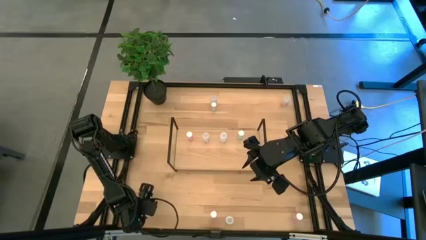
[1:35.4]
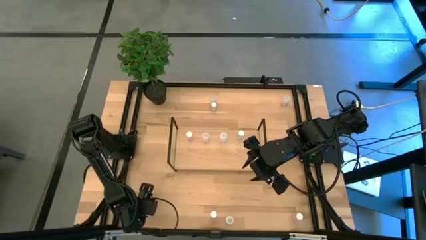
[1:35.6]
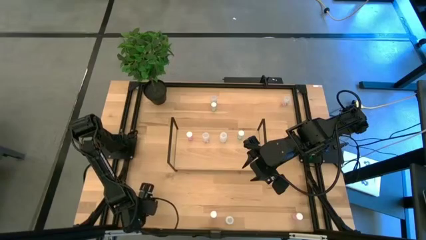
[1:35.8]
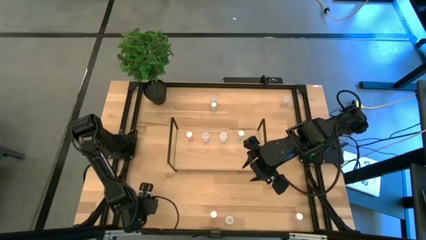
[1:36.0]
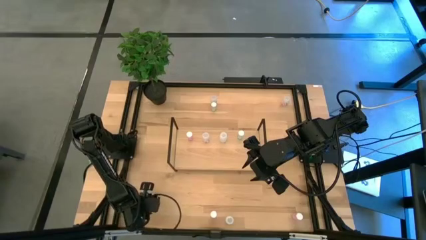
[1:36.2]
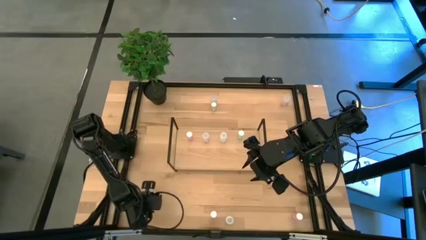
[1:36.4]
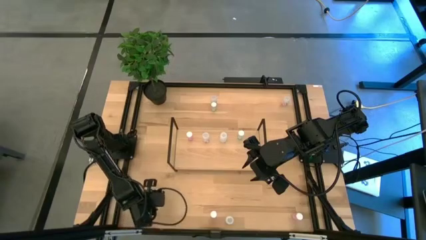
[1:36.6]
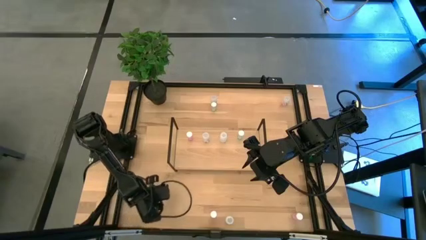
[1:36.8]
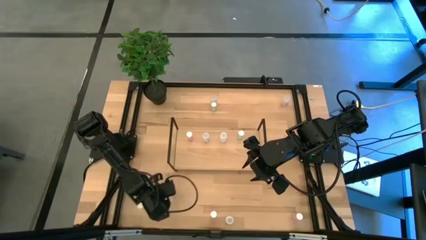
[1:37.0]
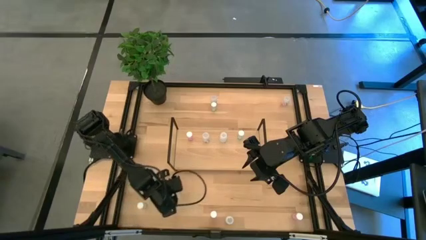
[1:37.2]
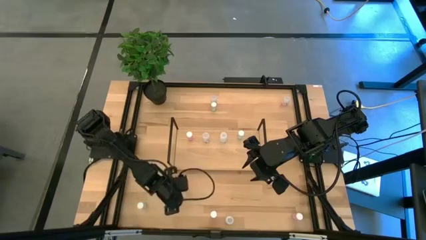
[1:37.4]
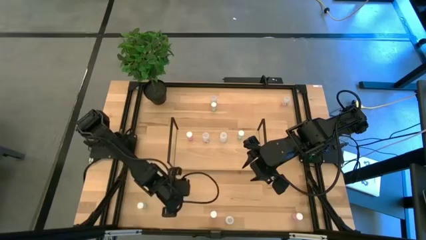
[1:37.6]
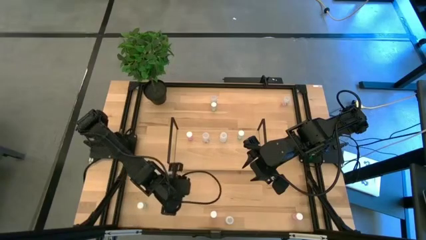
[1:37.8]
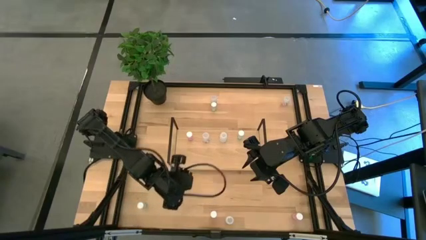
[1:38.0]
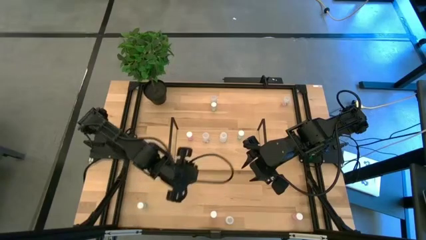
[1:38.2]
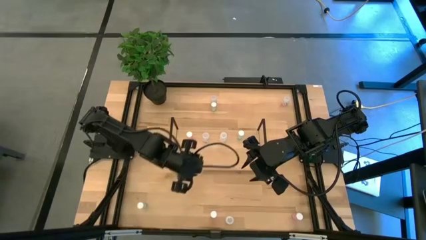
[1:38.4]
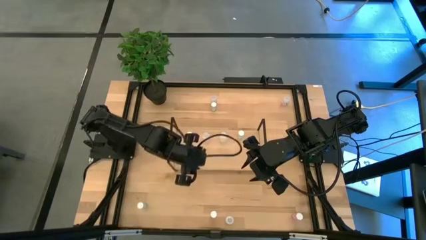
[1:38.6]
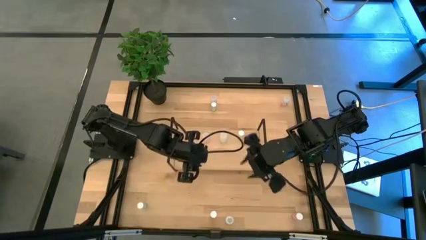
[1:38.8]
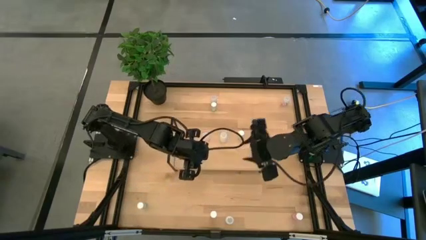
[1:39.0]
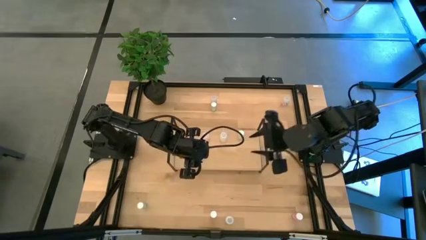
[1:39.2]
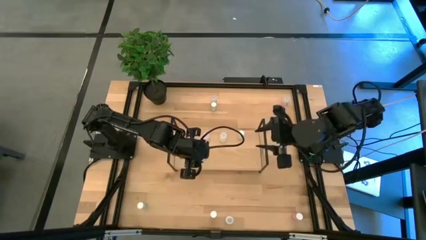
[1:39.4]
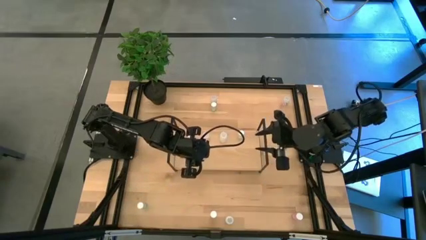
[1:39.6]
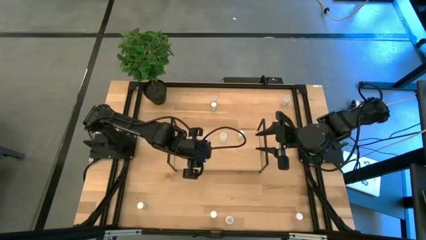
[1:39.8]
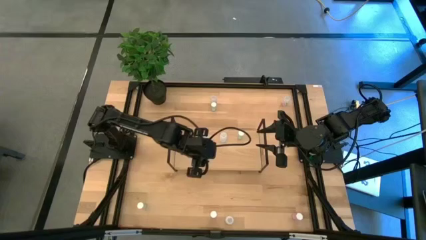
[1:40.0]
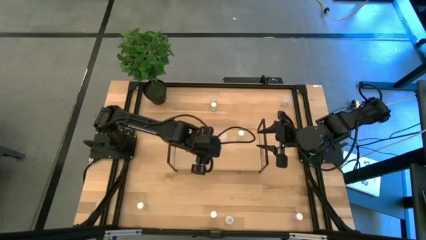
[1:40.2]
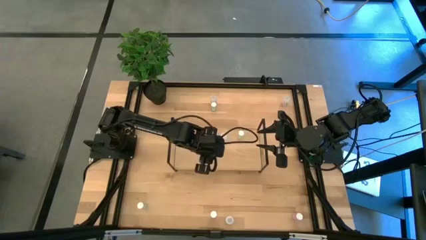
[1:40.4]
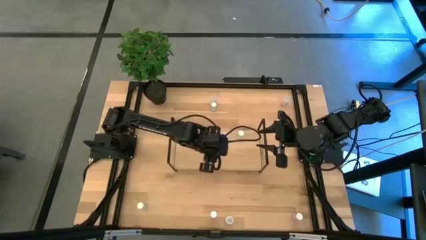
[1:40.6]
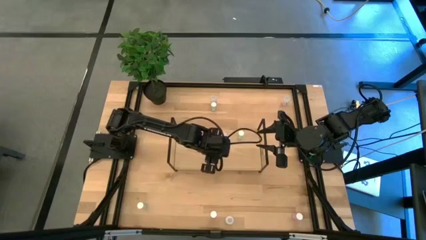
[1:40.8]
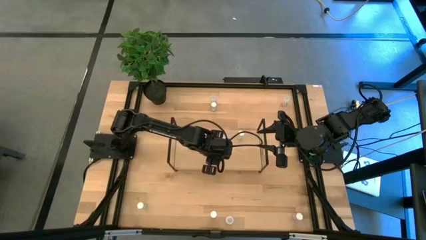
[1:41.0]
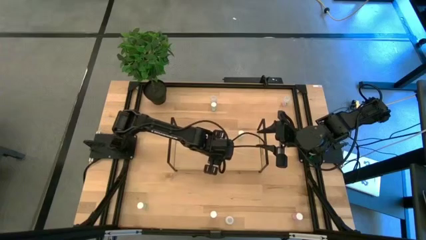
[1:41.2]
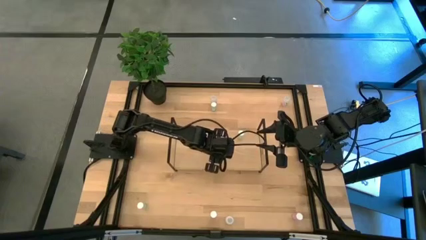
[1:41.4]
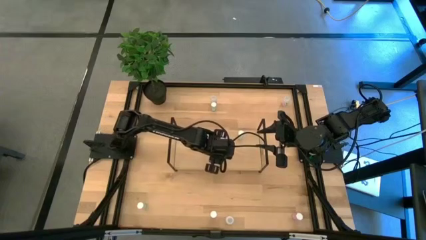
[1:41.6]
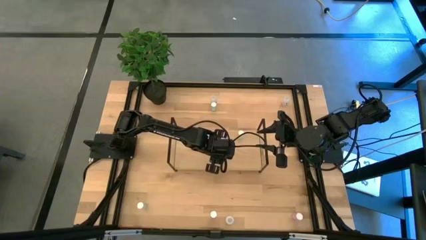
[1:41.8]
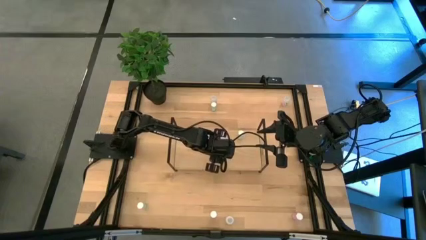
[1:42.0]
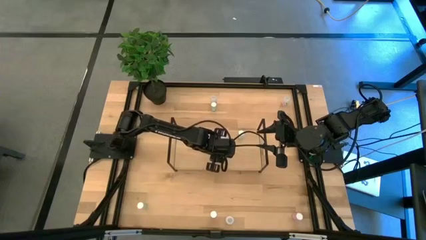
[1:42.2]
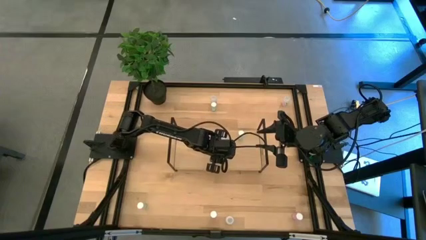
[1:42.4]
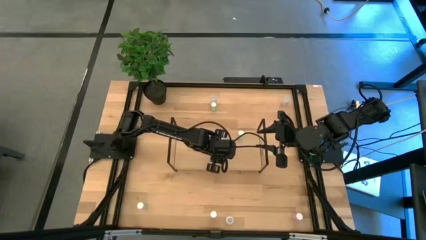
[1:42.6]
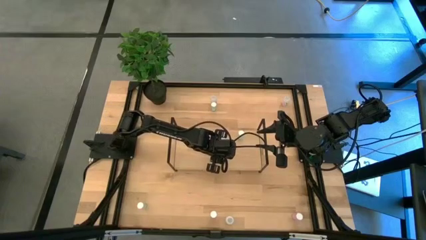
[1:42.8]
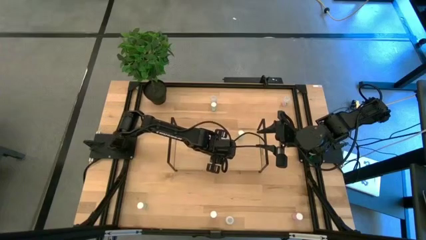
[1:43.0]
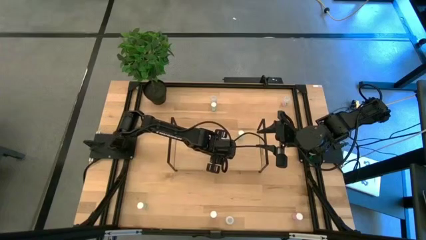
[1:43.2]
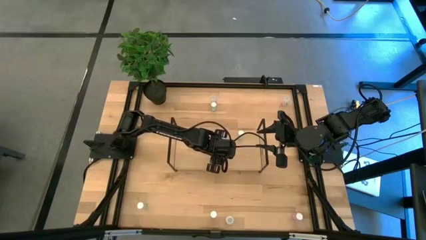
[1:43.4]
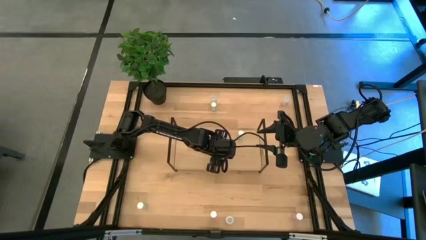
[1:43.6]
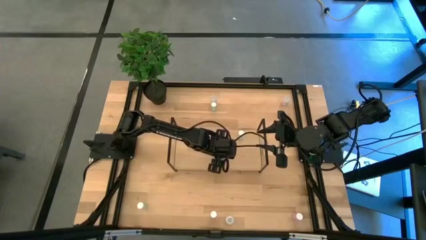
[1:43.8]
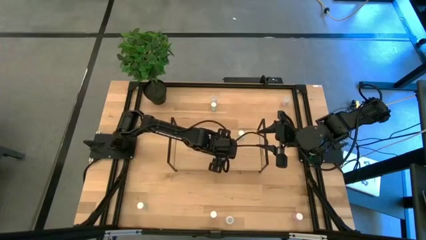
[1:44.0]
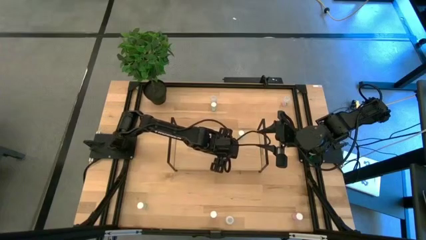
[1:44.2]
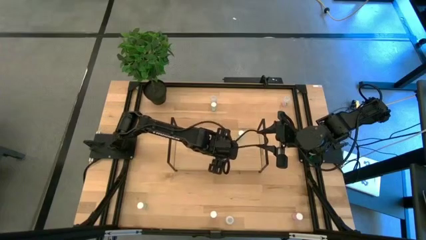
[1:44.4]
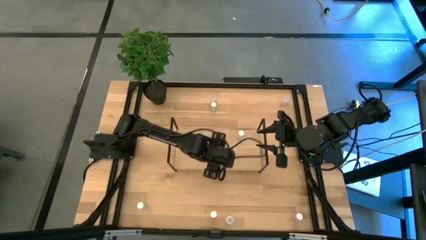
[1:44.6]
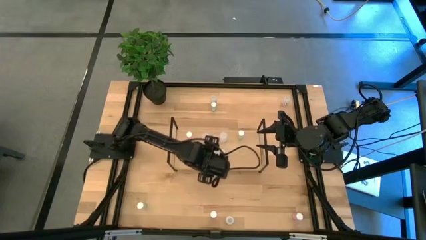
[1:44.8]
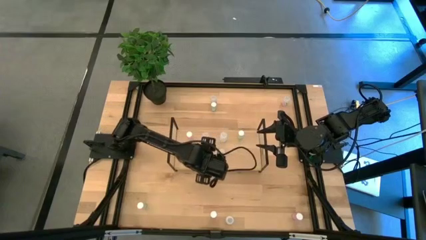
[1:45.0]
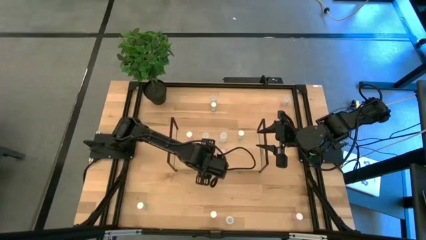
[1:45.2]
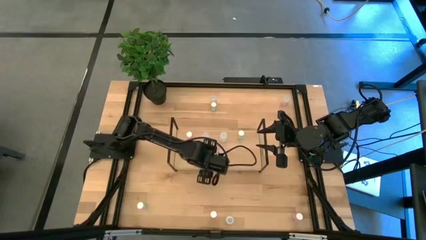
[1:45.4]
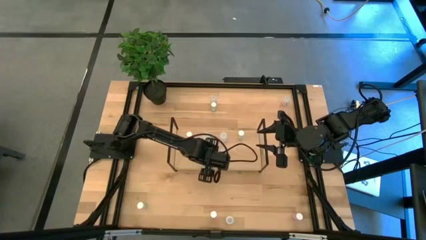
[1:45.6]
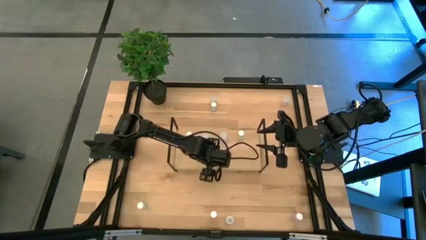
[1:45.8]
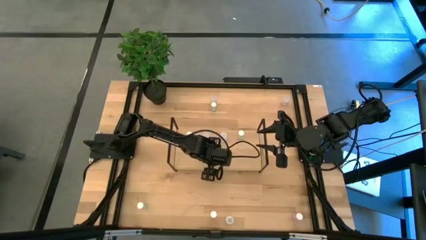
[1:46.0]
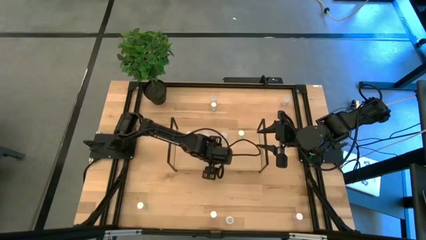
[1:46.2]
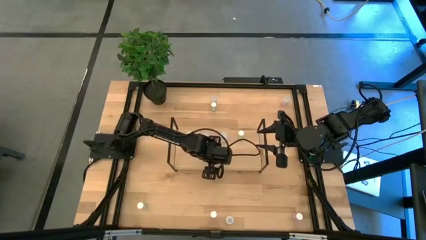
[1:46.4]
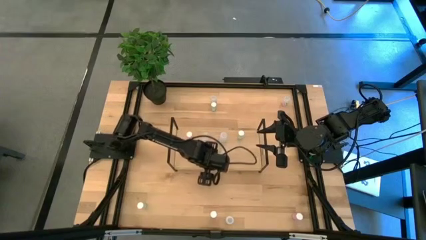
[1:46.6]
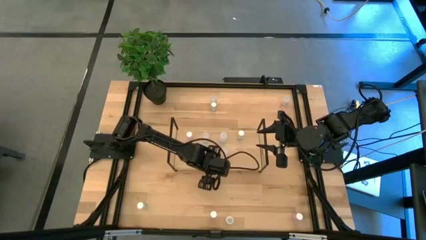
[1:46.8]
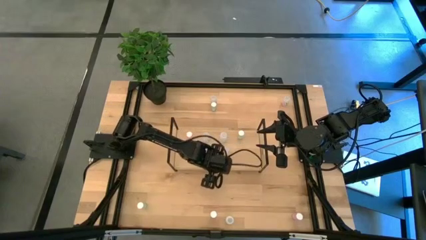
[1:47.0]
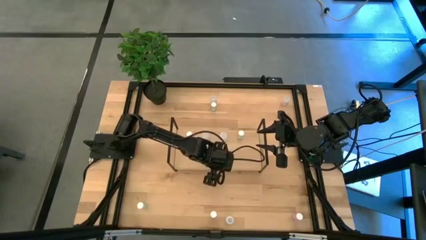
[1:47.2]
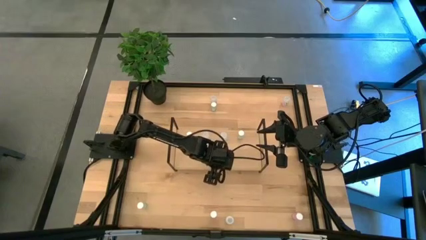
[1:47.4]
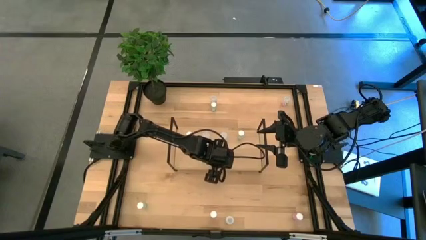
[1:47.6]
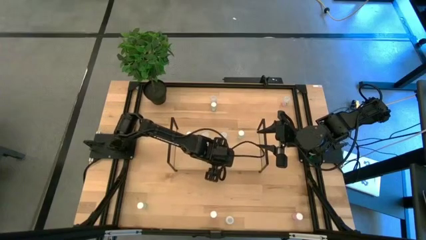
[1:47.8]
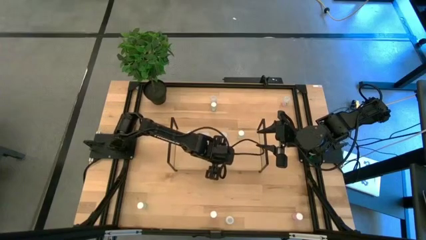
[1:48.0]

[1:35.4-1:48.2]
Task: Pick and place medicine bottles onto shelf by color
Put the bottom left white pill bottle on the shelf aligned with the other white pill bottles

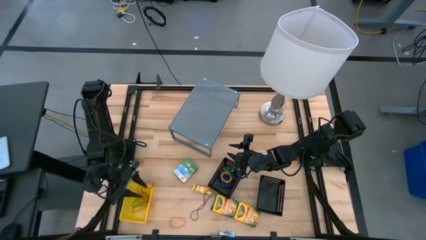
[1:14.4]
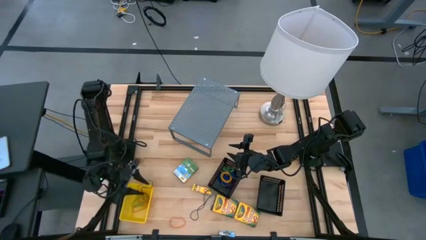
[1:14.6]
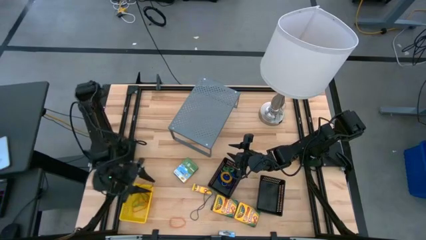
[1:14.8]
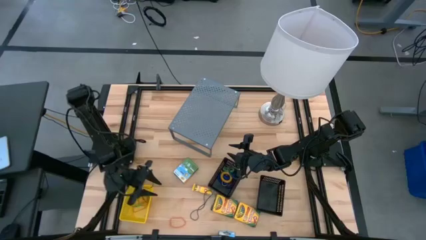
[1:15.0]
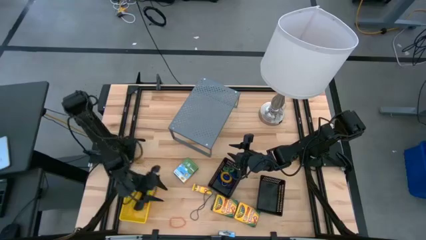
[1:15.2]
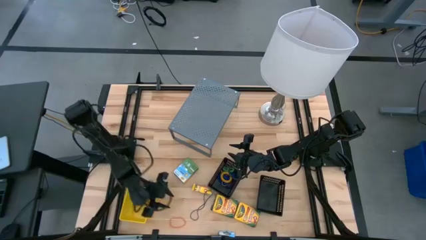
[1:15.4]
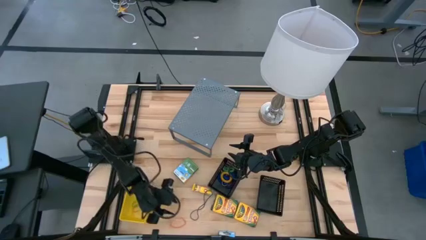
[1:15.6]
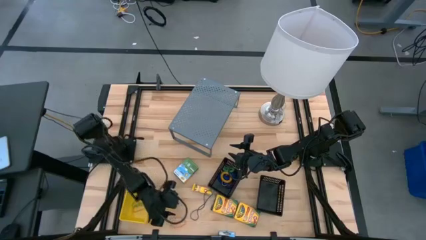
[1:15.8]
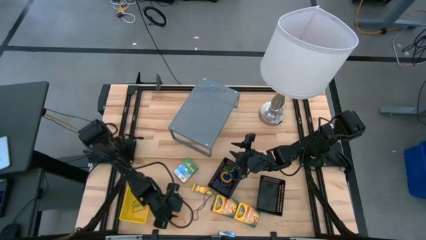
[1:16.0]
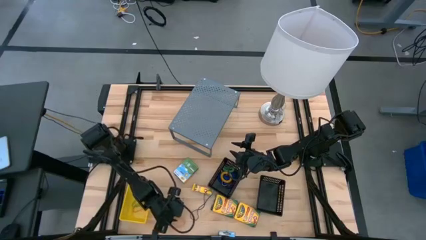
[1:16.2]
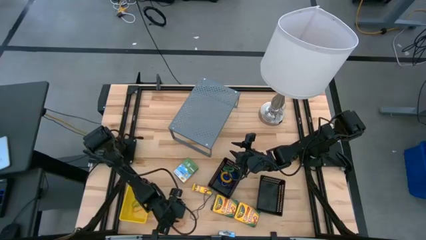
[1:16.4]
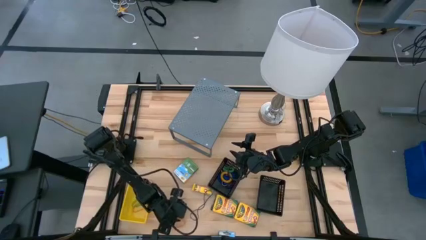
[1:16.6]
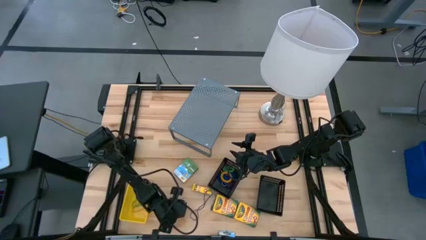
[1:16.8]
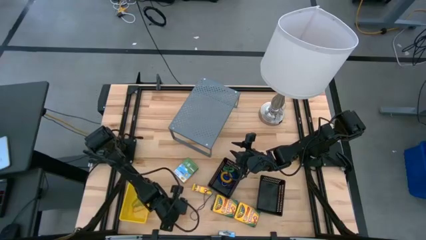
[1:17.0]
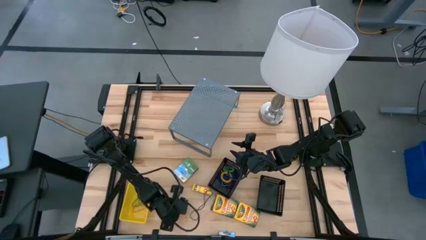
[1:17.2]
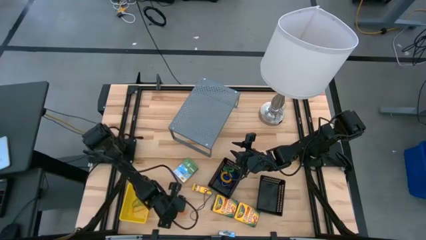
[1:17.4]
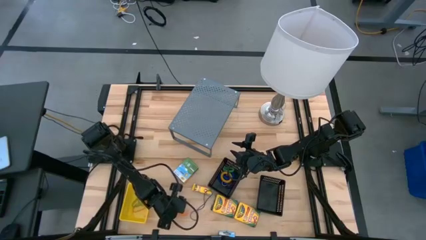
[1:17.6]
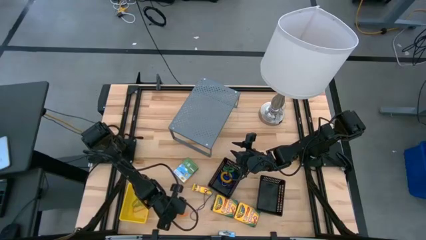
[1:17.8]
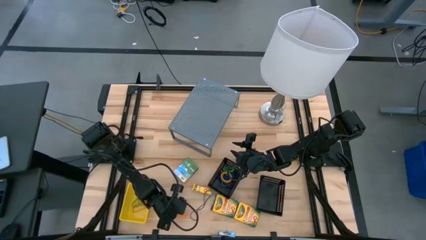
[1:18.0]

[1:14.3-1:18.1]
Task: Pick & Place Office Desk Supplies
Put the orange rubber band into the yellow bin

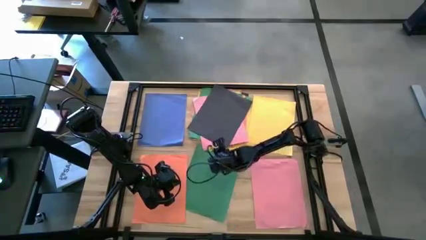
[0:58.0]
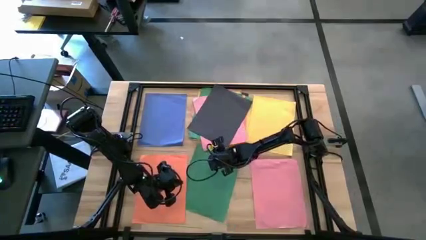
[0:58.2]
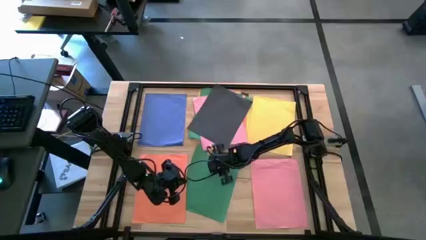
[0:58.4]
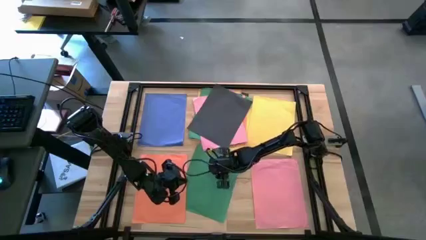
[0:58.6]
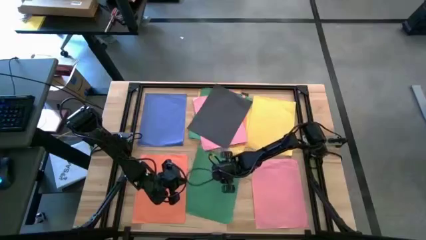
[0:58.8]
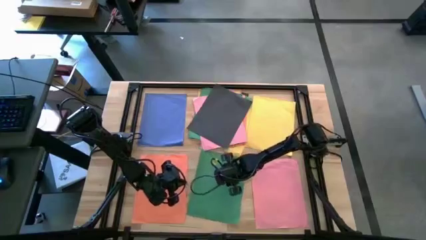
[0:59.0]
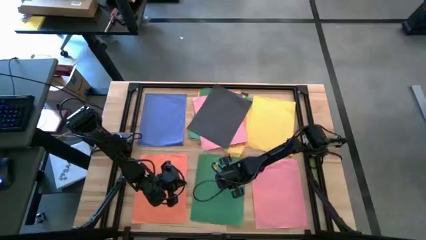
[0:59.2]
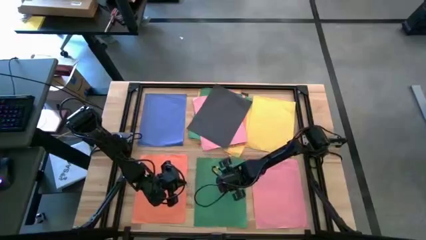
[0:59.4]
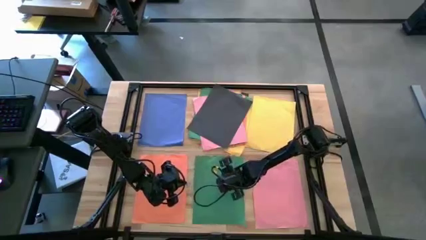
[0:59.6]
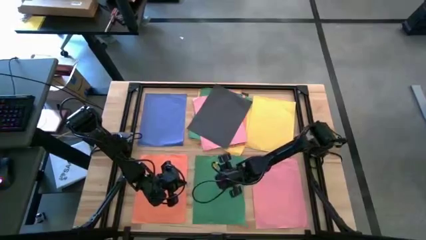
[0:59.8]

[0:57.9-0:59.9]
Task: Organize paper
Adjust the green paper
